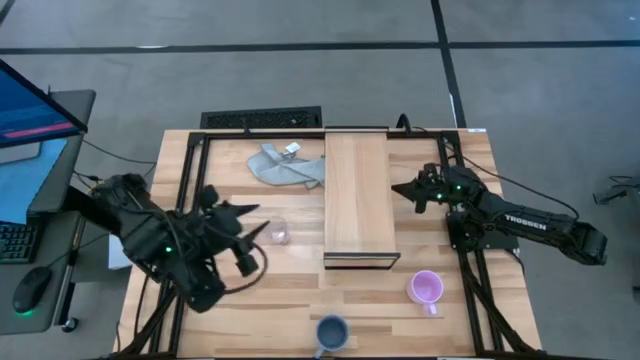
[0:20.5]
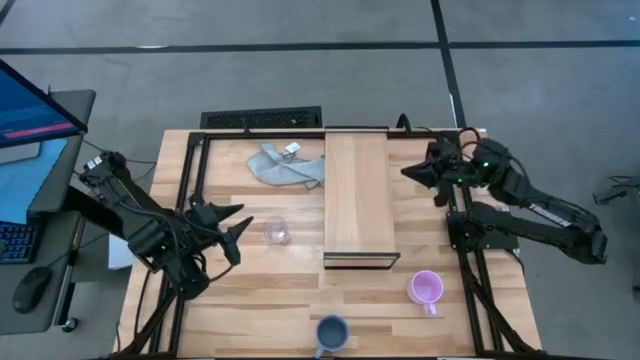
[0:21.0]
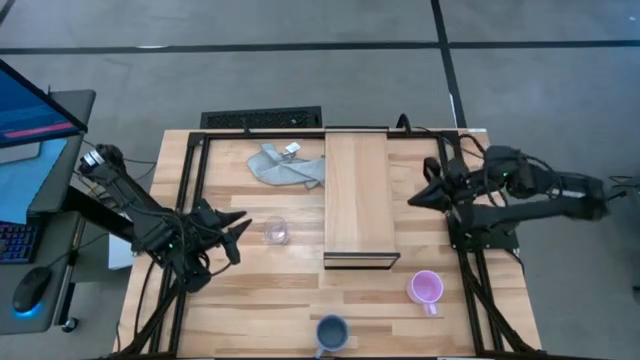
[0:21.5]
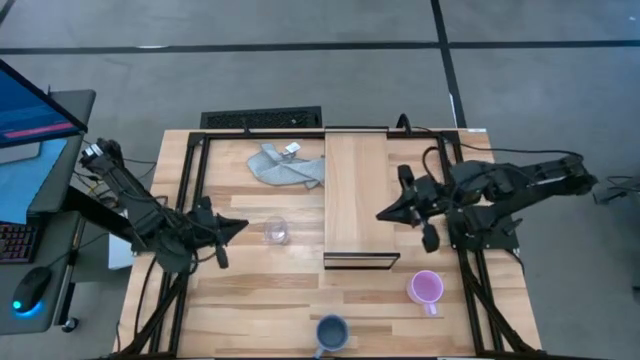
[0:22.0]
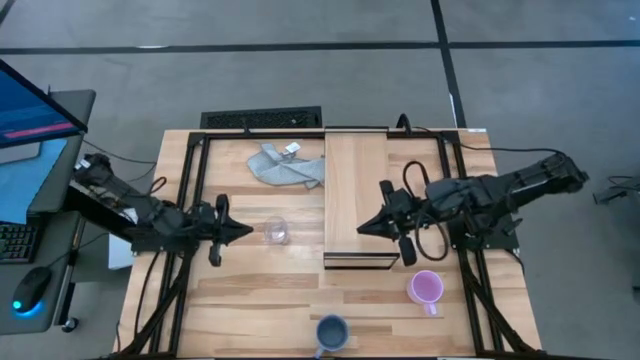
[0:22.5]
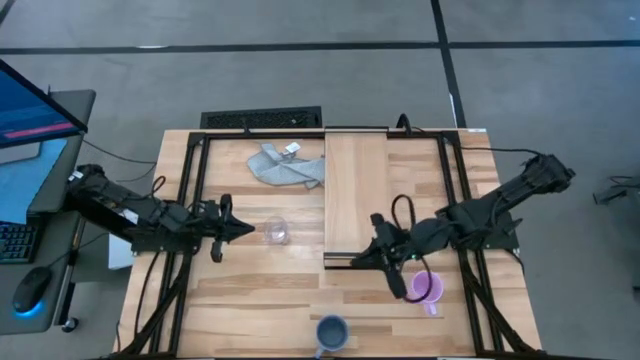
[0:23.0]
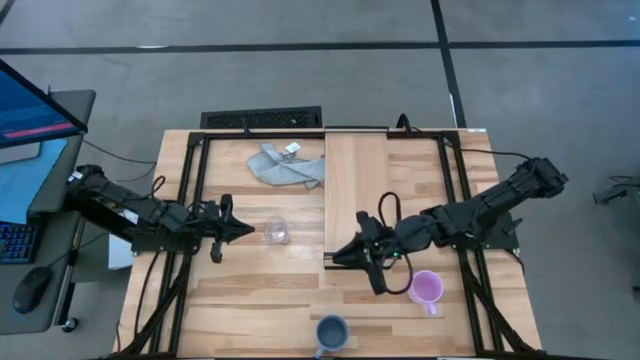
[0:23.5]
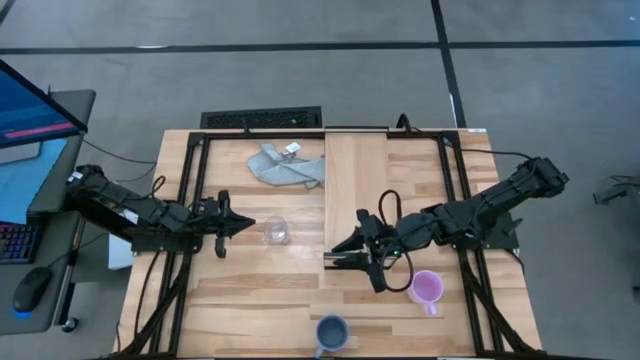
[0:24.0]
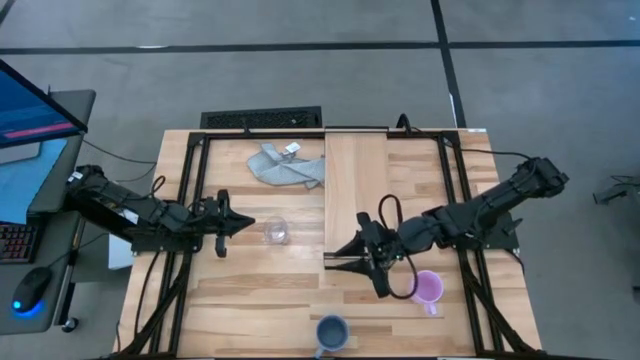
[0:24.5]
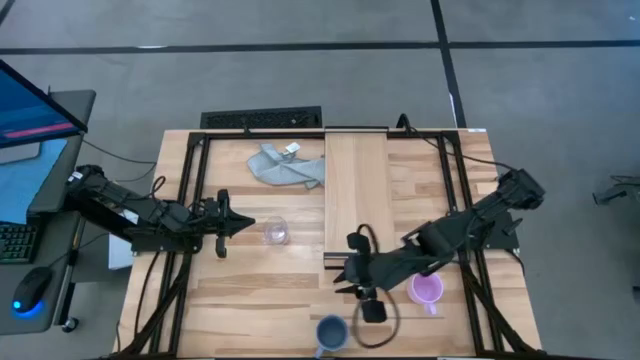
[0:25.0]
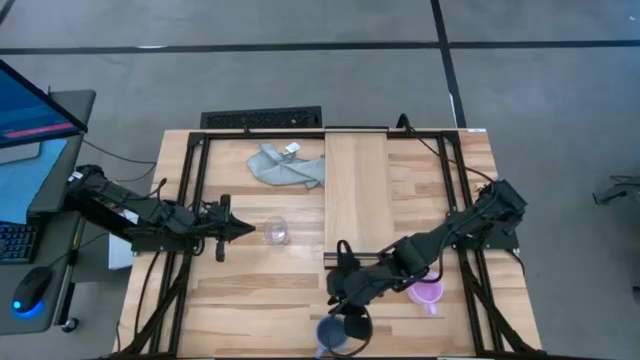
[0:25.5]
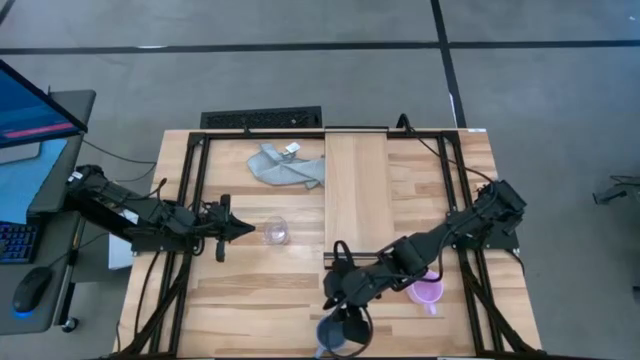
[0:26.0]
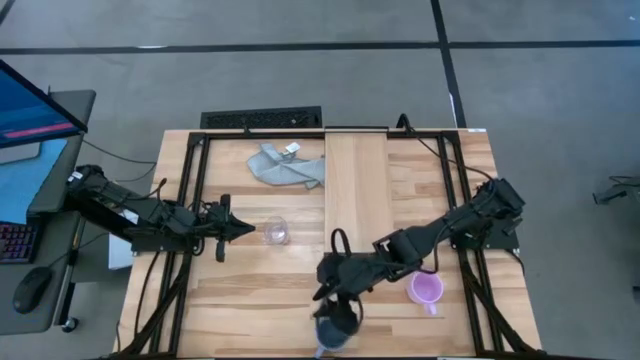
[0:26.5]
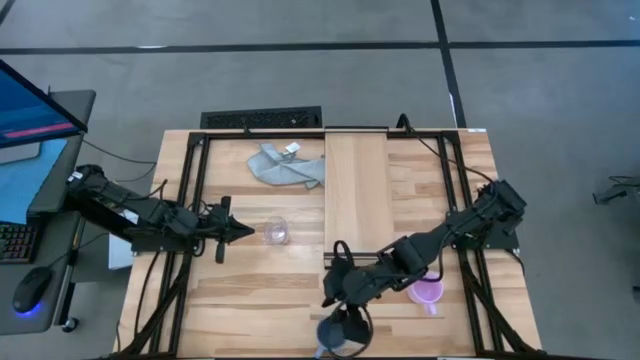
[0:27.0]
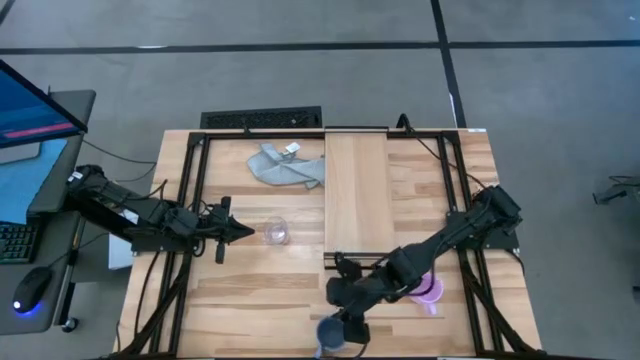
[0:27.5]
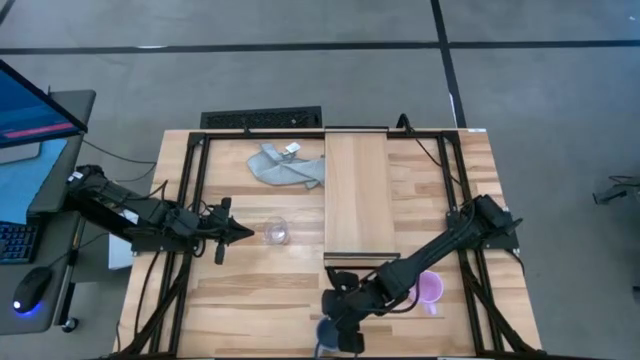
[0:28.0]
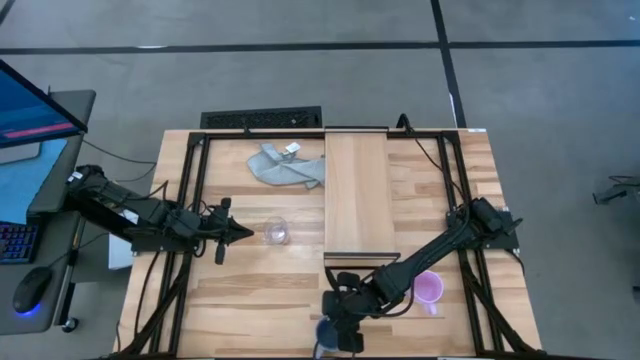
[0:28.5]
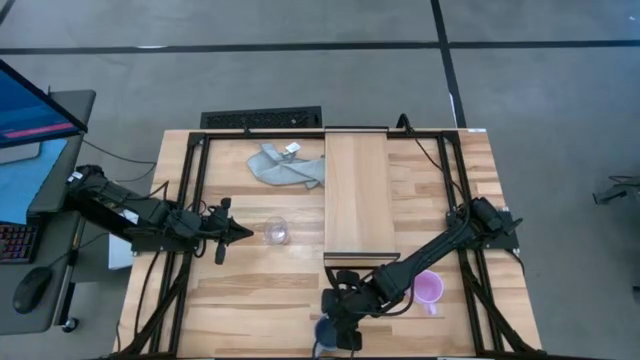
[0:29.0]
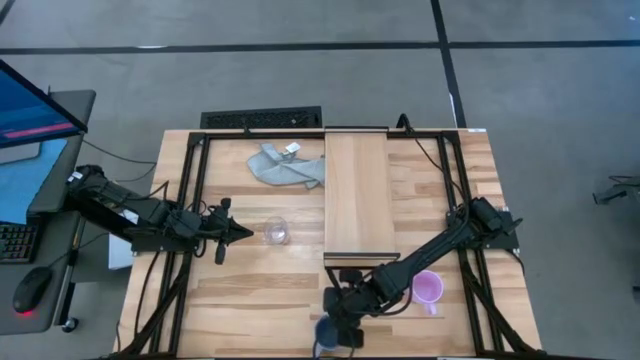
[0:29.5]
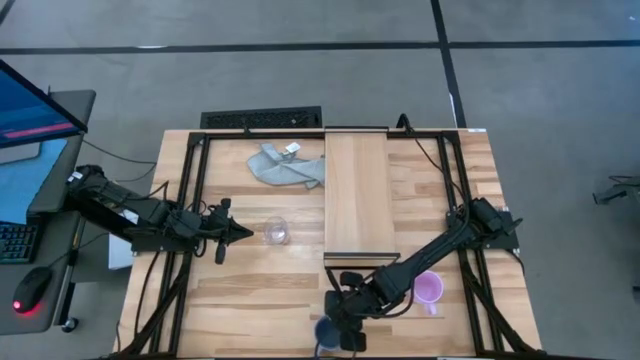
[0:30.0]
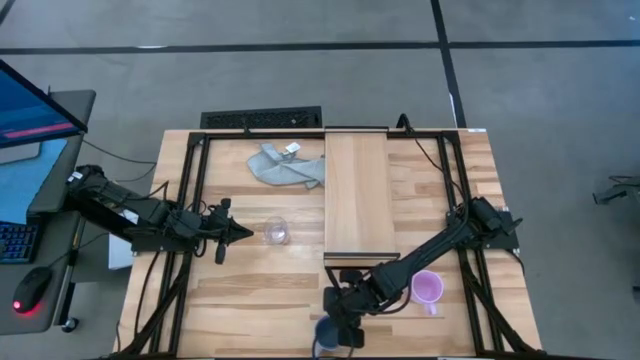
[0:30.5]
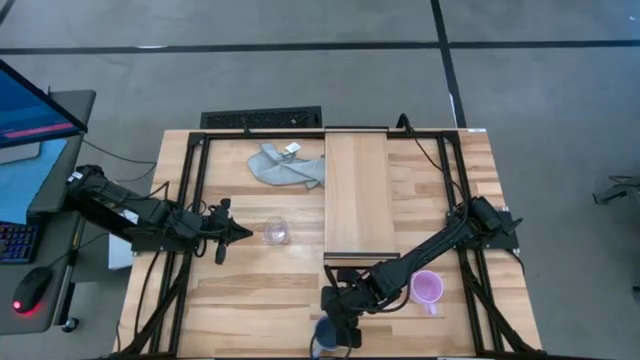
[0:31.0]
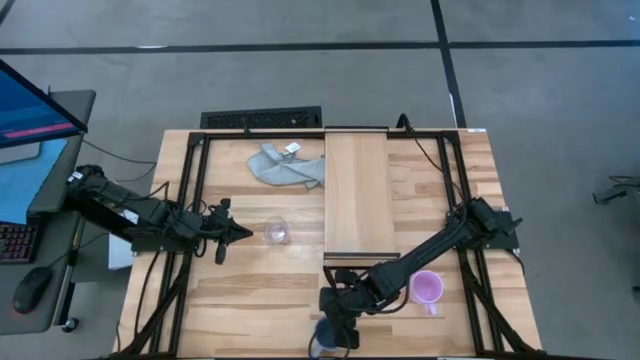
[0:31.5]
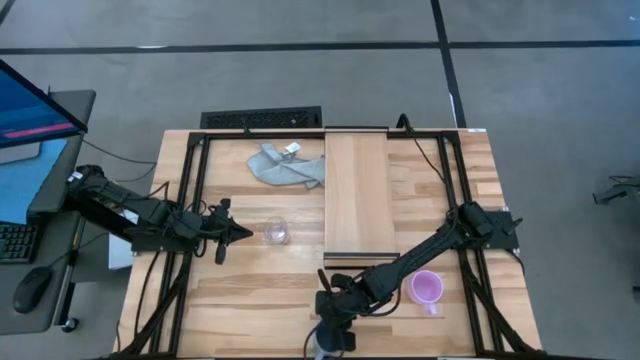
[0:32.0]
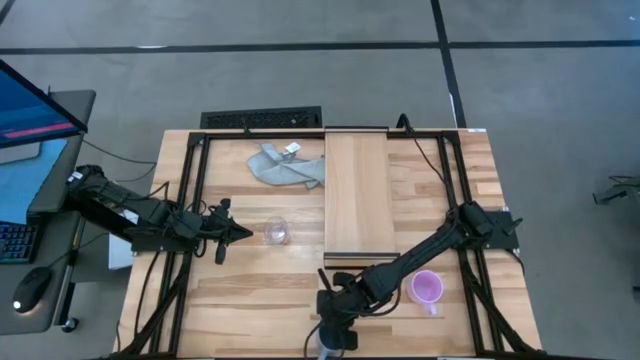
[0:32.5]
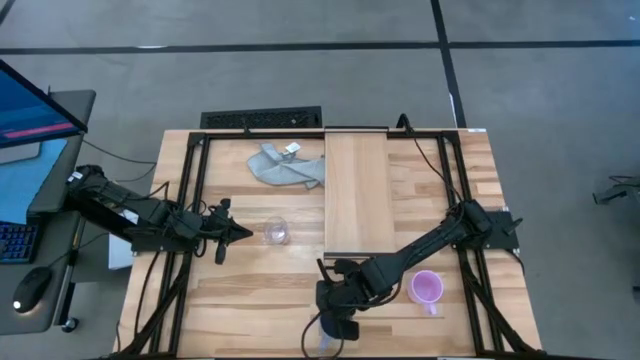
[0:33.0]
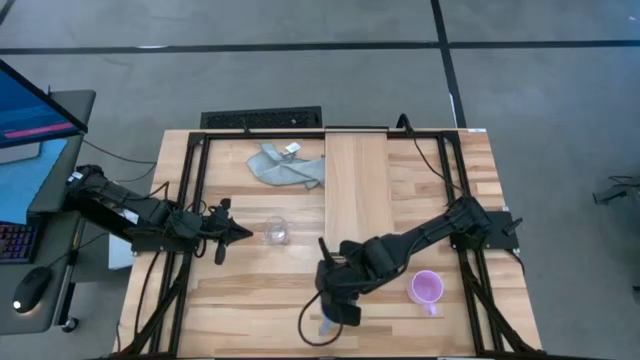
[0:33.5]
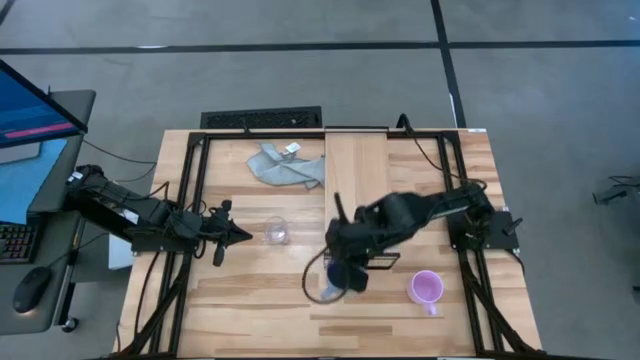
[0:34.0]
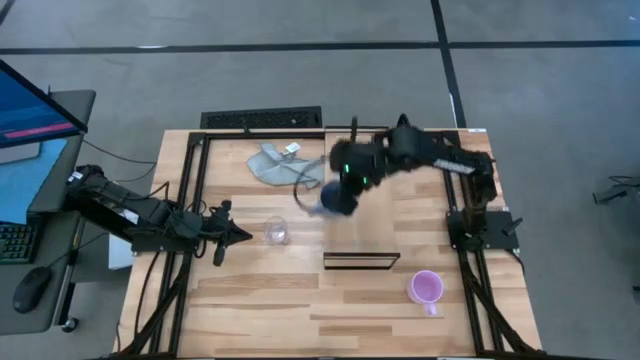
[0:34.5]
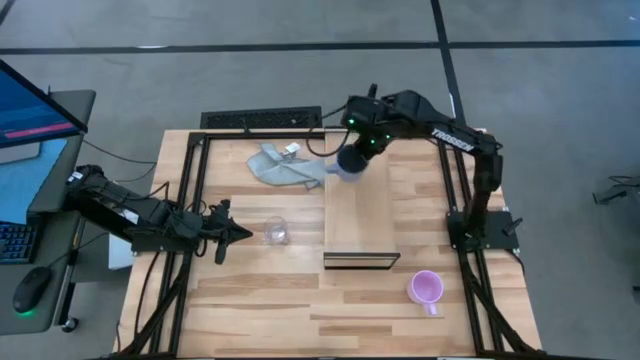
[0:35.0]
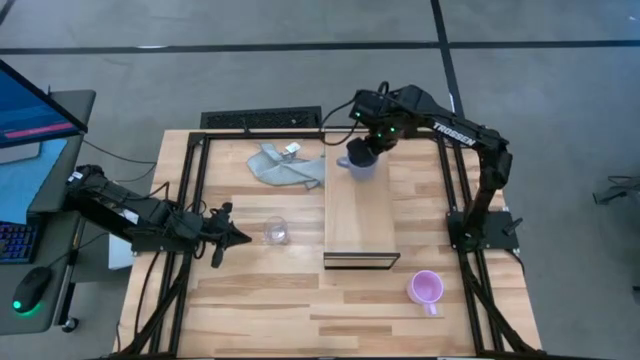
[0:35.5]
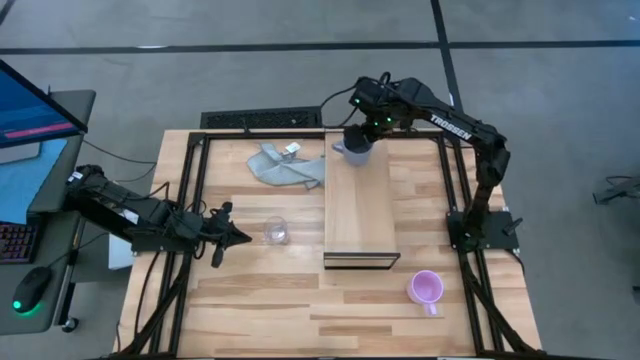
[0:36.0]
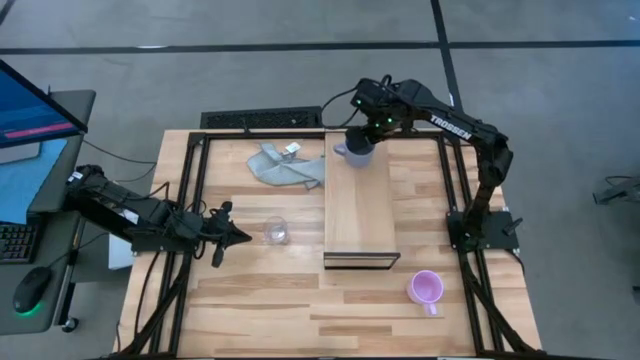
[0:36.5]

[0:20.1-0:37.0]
Task: Stack small to large cups/mugs on shelf
Put the blue mug on the shelf

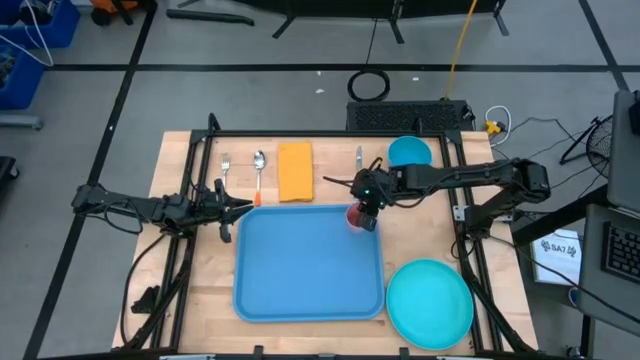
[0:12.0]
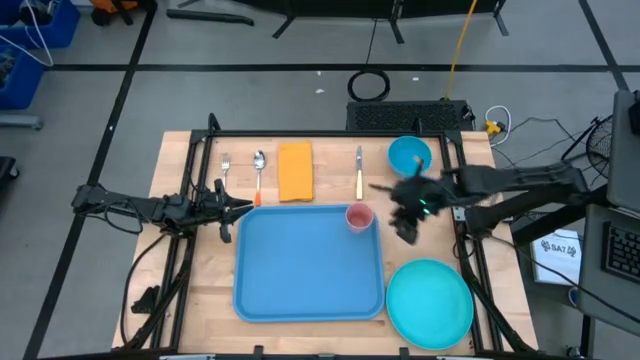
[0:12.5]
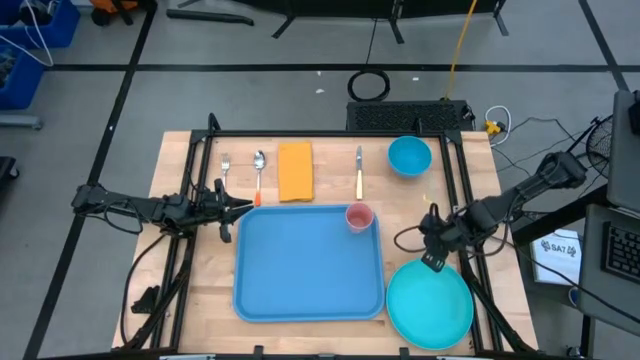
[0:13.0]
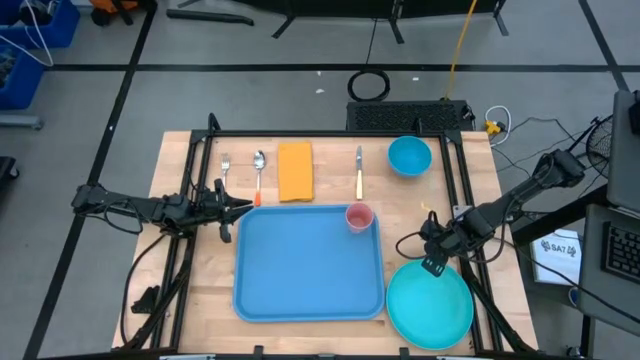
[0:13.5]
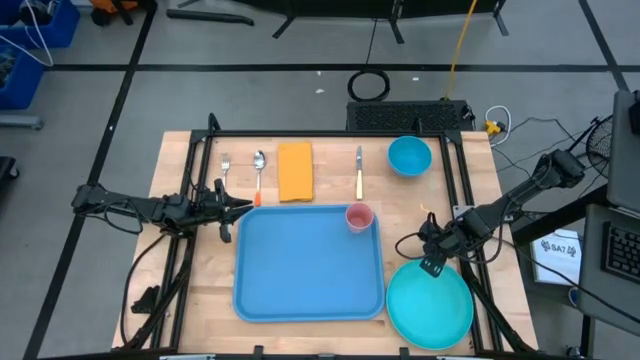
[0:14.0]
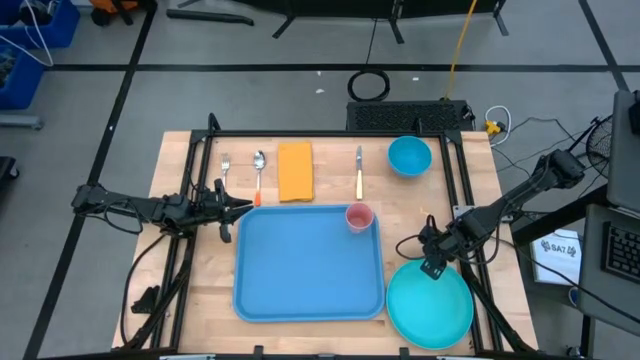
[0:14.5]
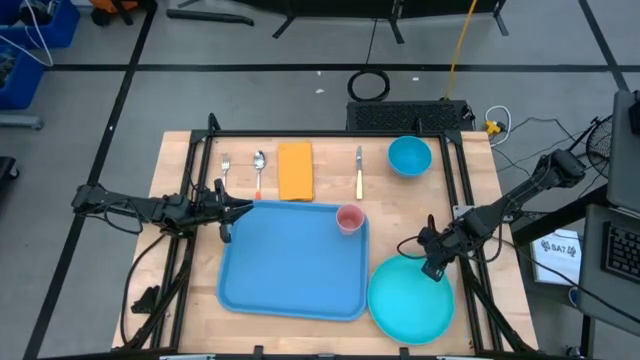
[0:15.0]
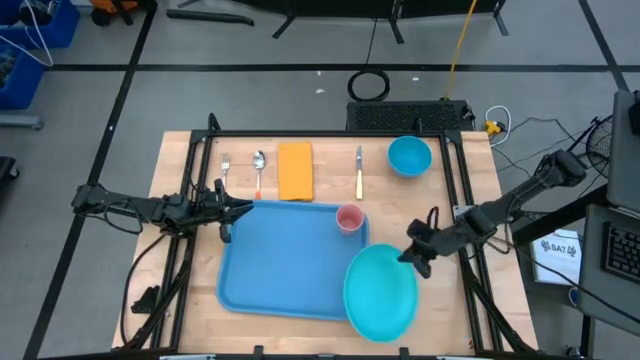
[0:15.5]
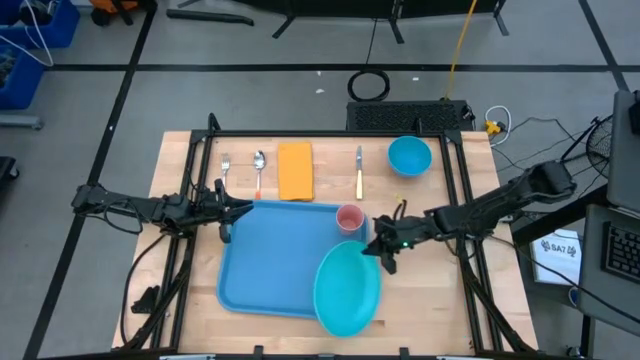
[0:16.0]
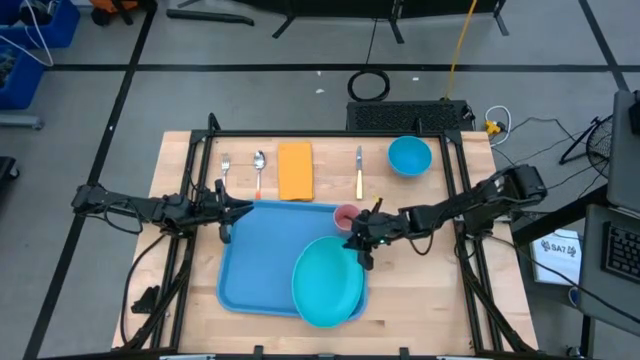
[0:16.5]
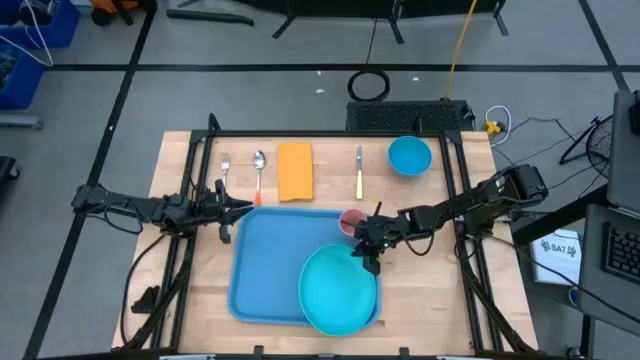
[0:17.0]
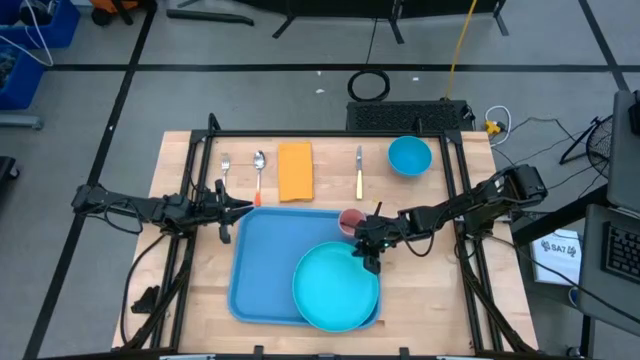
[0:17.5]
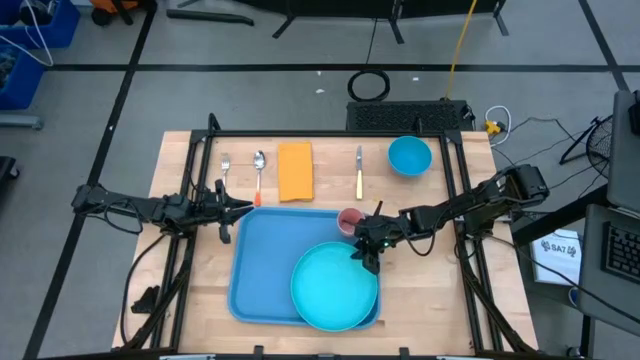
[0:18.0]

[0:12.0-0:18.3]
Task: Set up tray
Put the light blue plate on the blue serving tray below the pink cup
